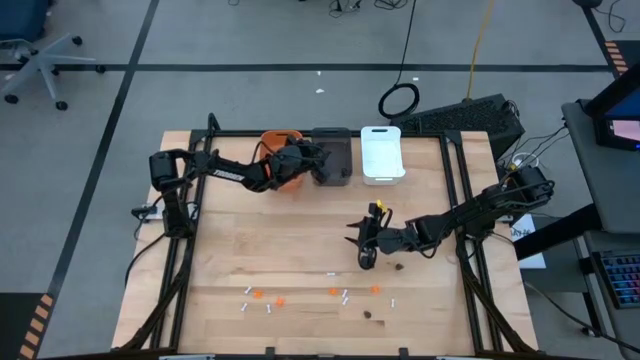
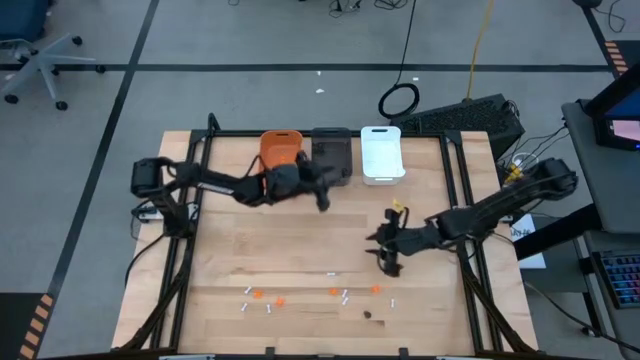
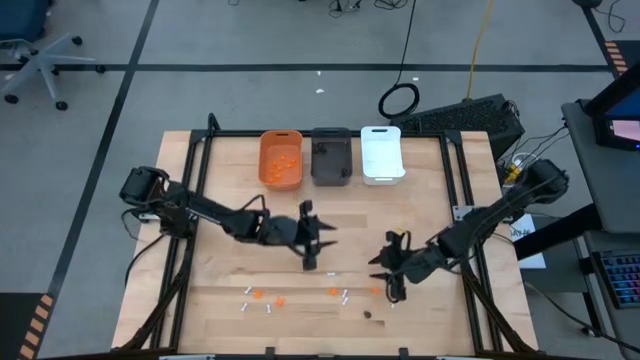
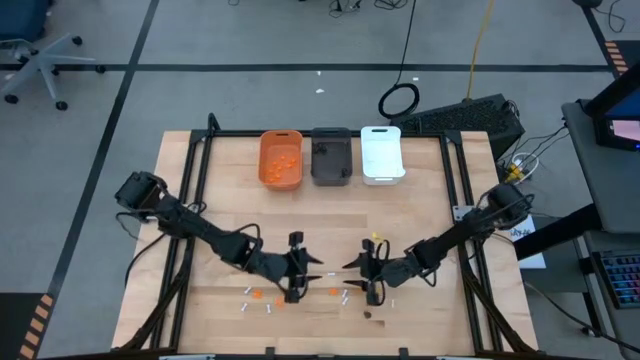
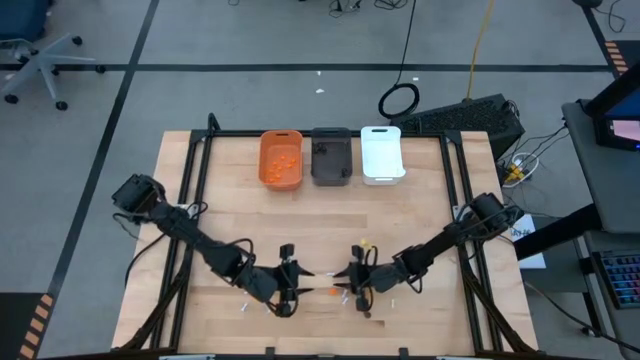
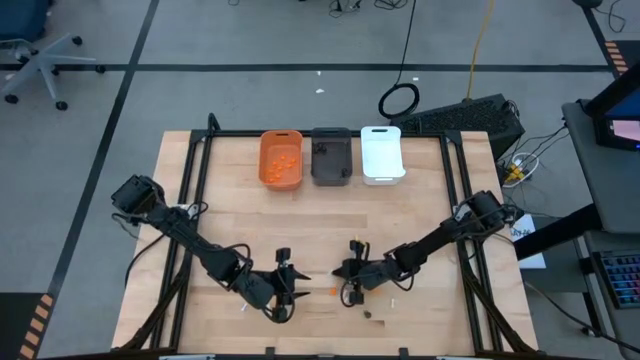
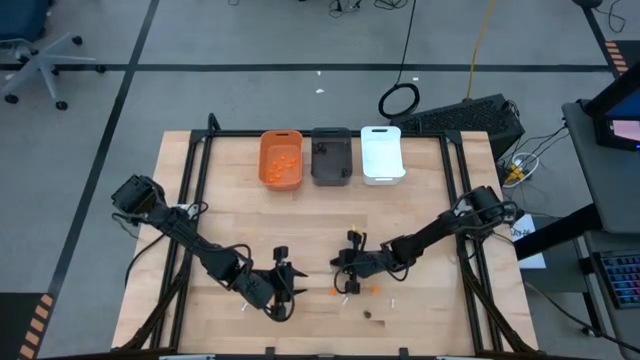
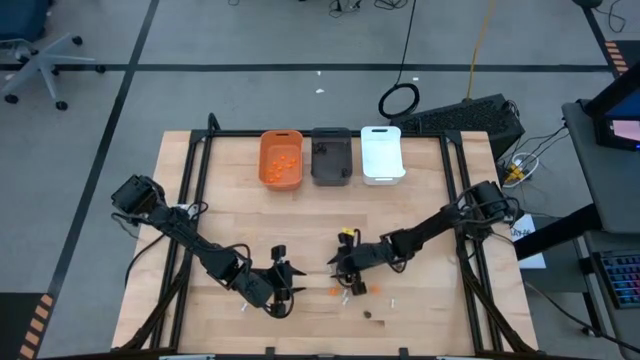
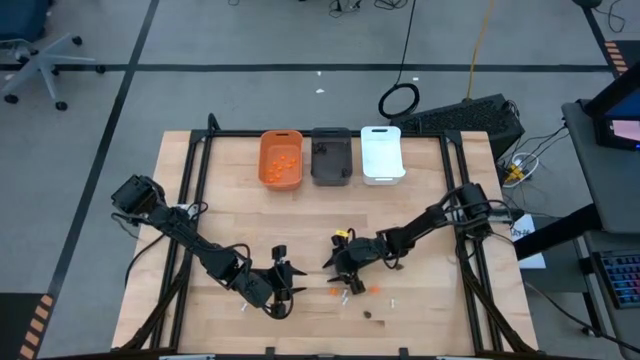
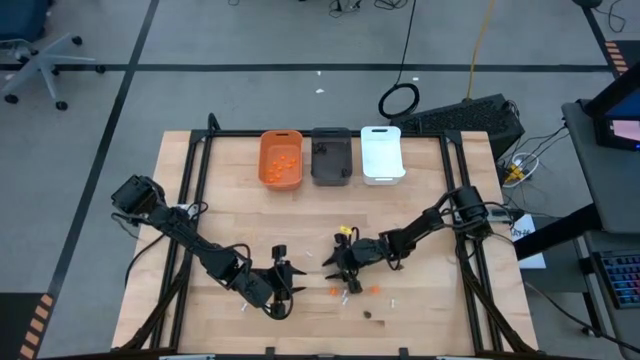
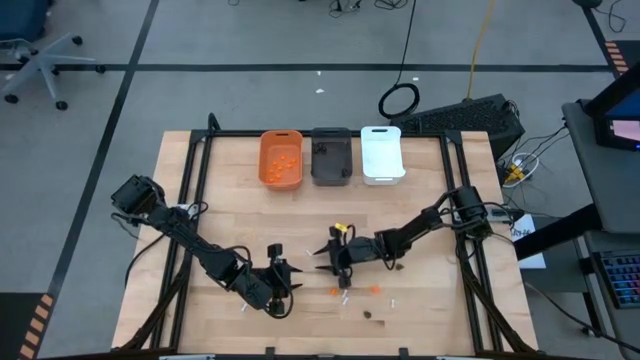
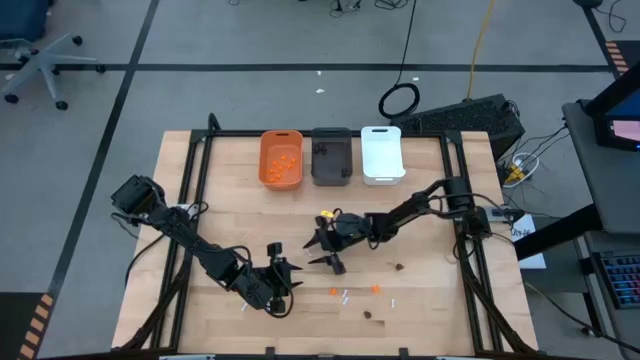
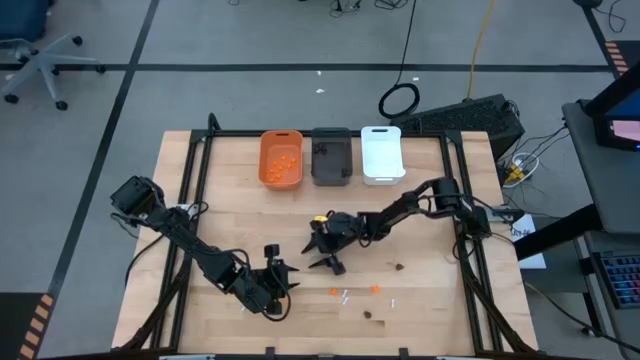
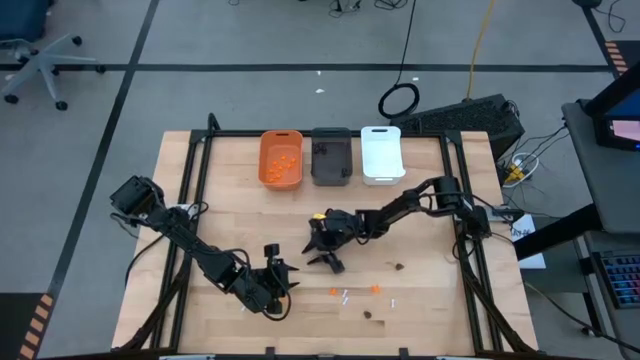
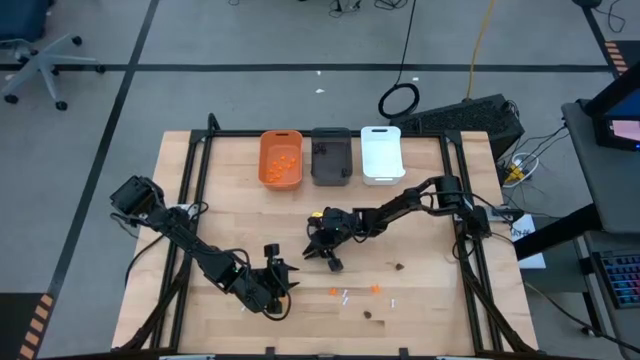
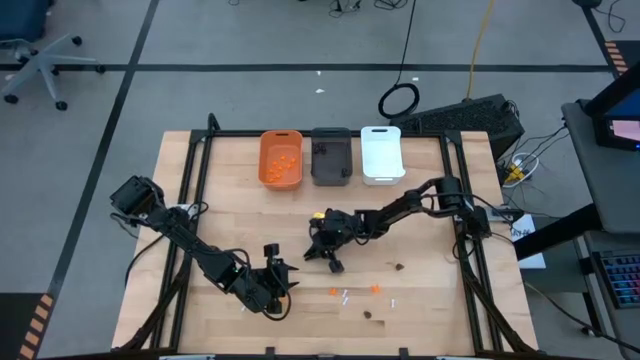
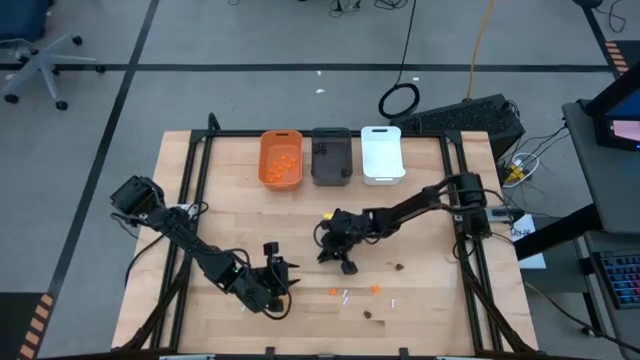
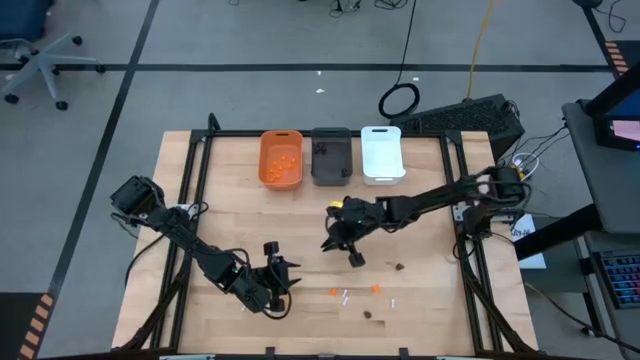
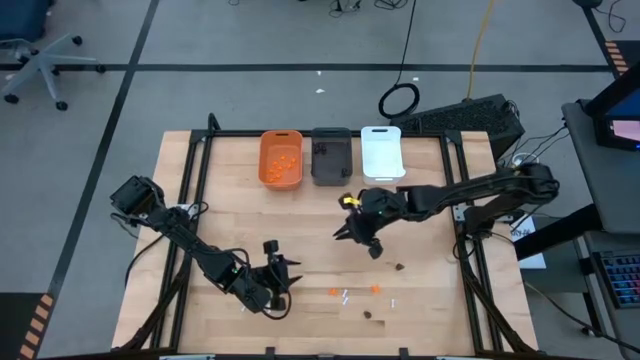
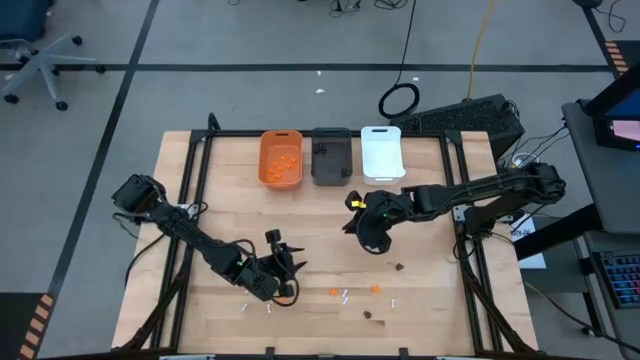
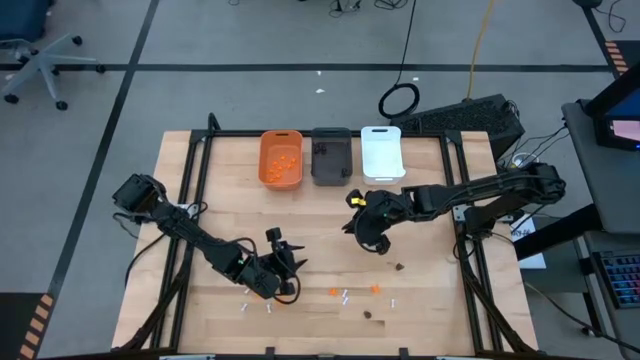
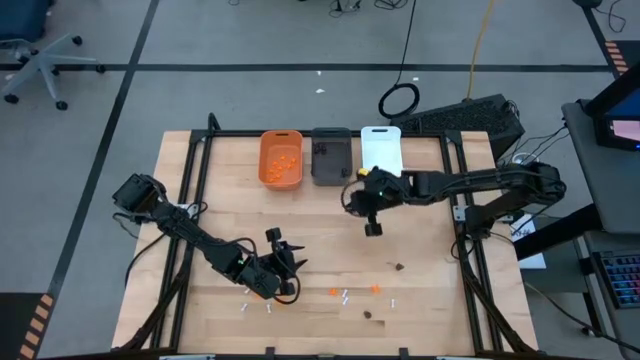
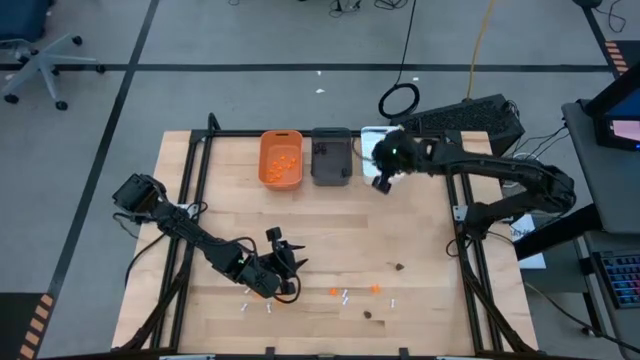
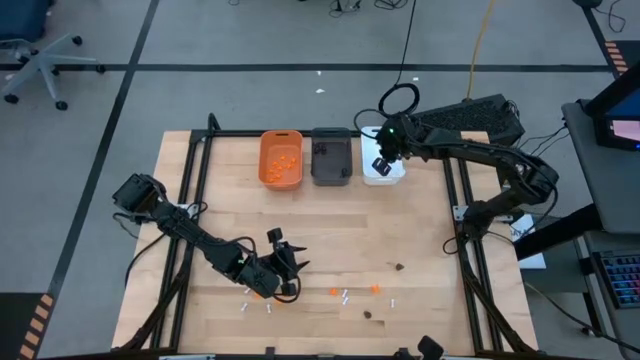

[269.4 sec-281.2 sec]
Task: Sort Halloween decoration
Put the white bone toy into the white bin

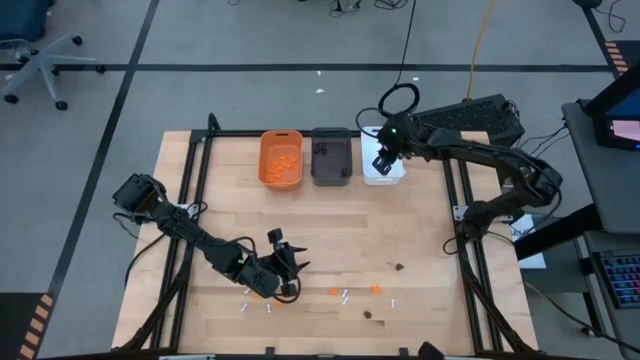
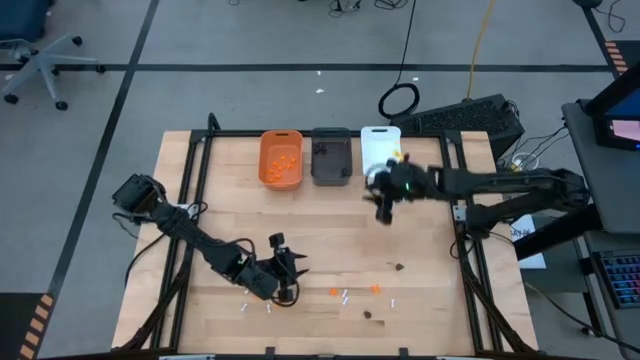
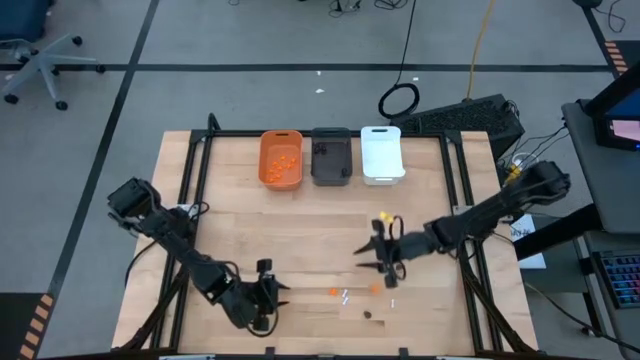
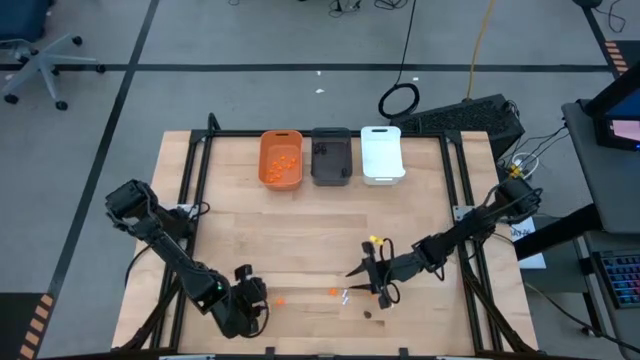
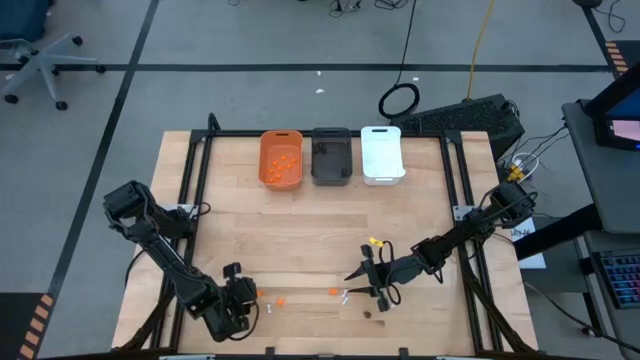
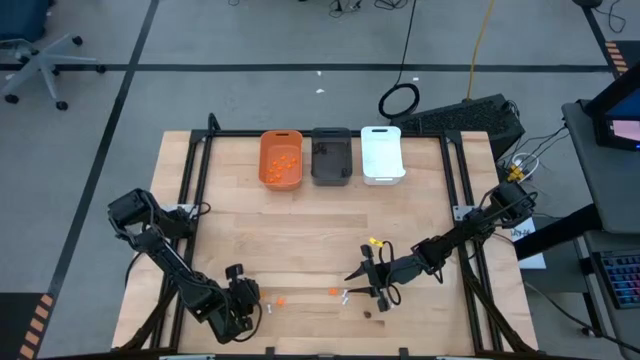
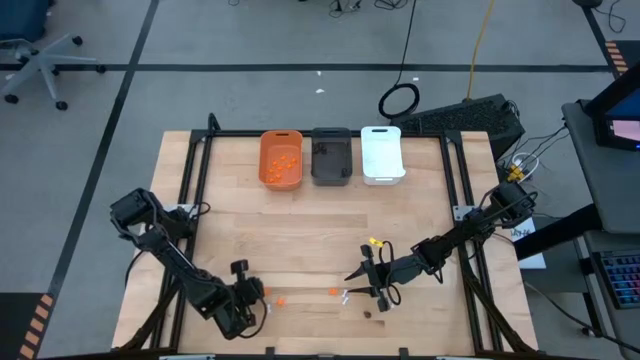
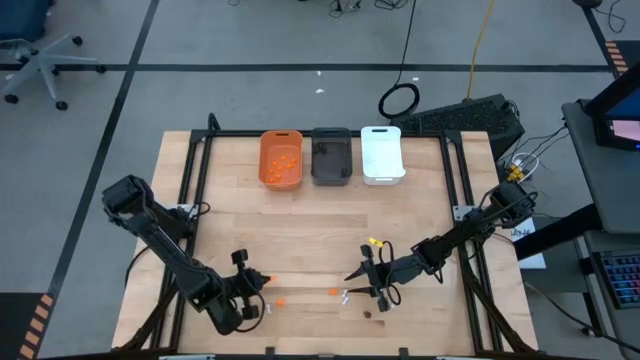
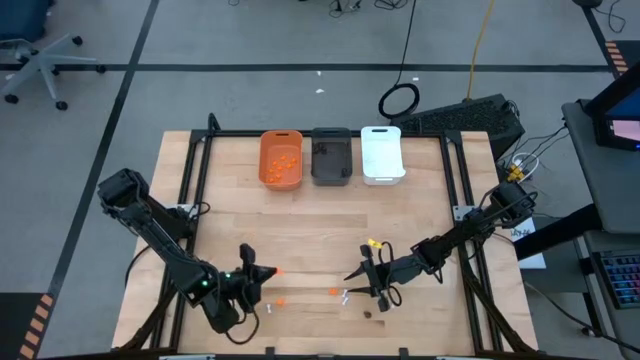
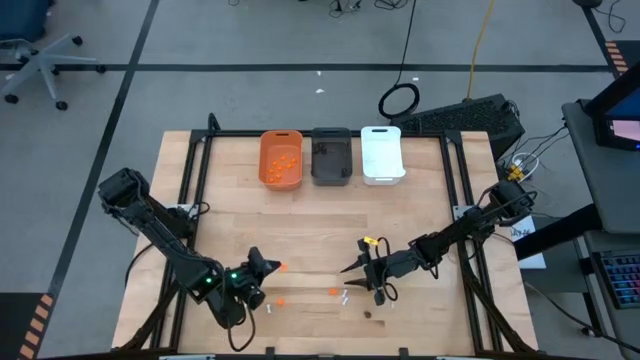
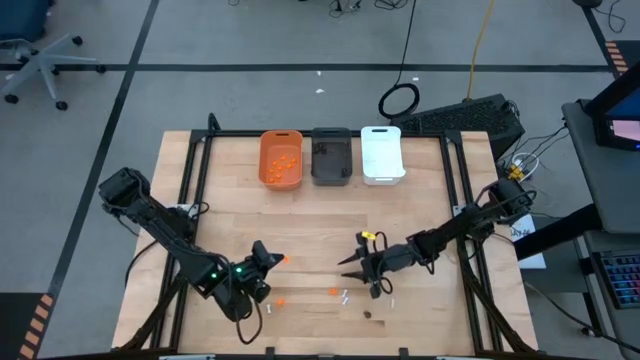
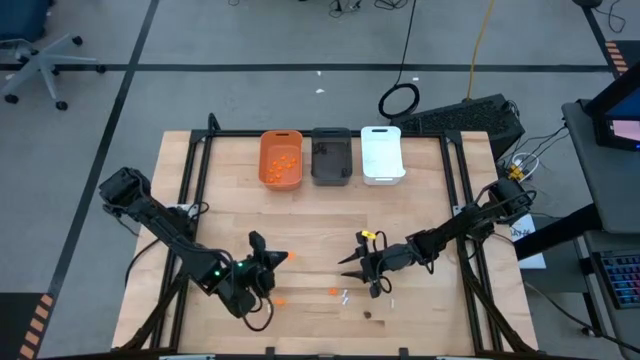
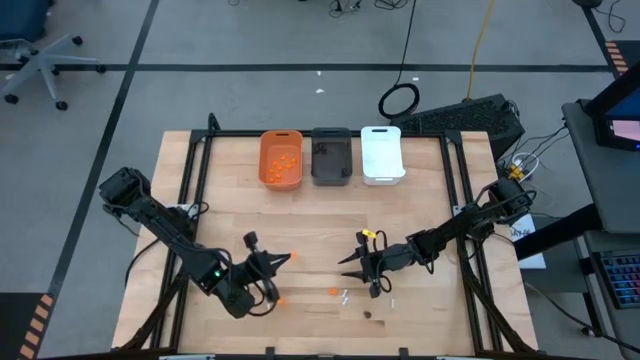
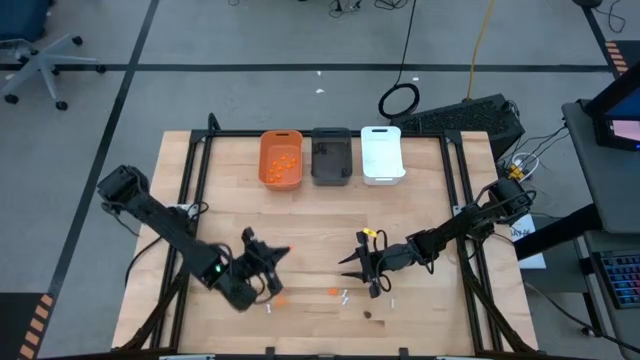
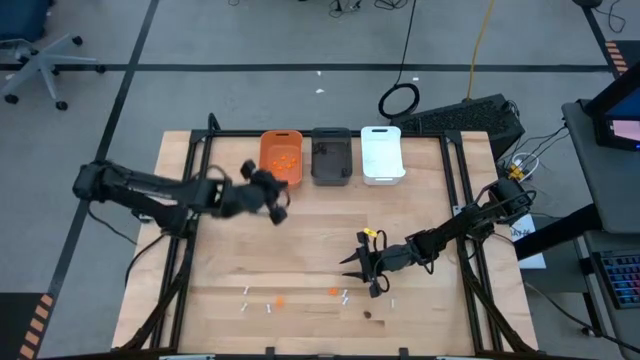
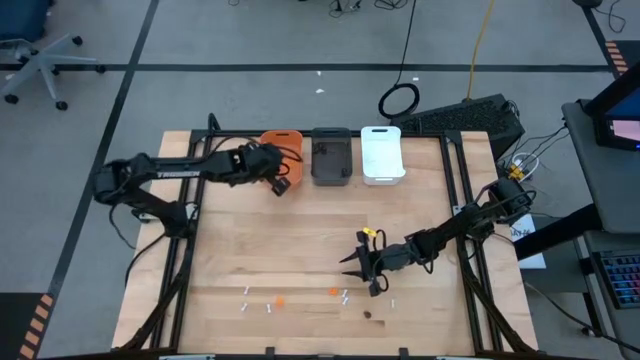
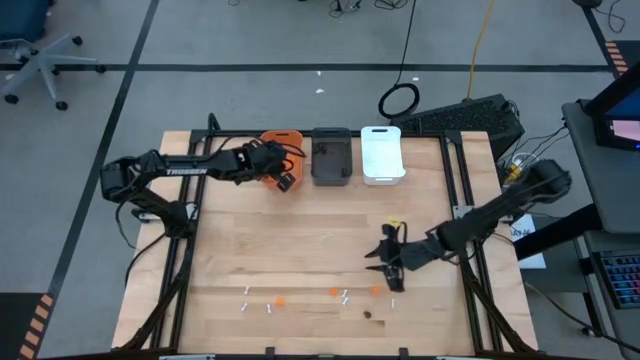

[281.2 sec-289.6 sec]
Put the orange spider toy into the orange bin
